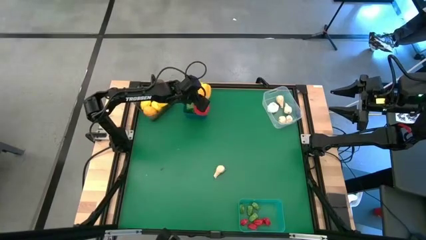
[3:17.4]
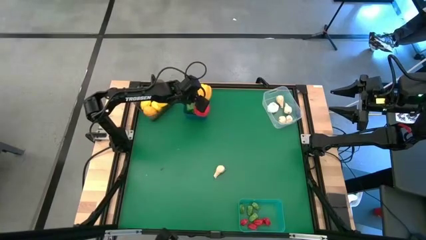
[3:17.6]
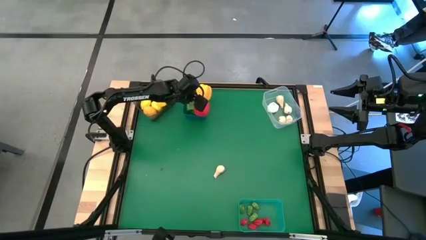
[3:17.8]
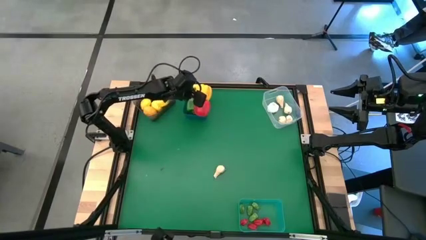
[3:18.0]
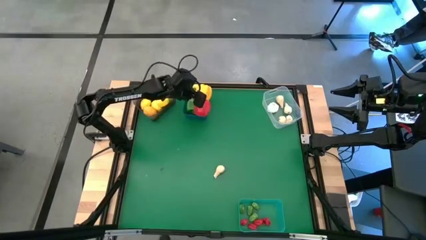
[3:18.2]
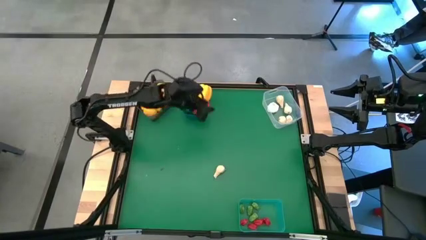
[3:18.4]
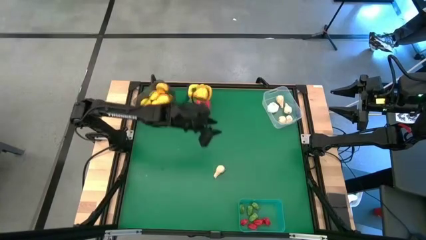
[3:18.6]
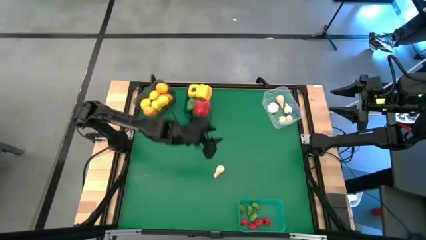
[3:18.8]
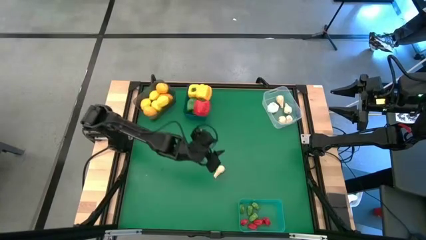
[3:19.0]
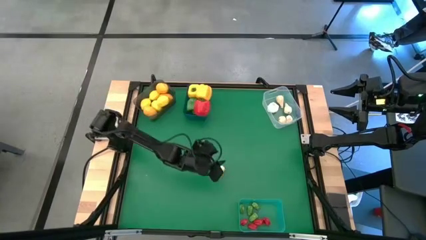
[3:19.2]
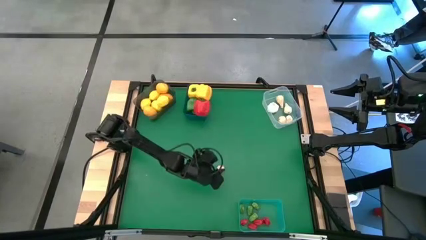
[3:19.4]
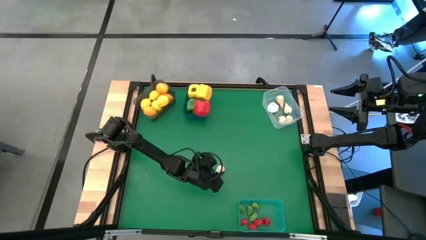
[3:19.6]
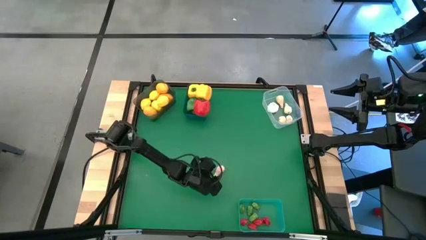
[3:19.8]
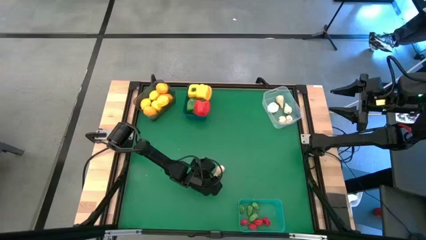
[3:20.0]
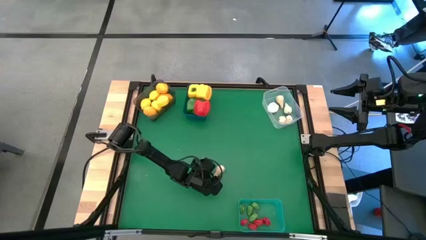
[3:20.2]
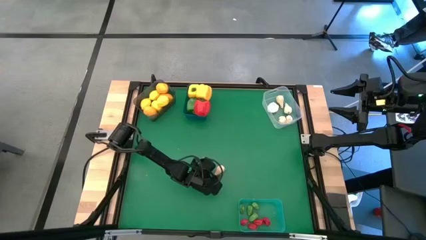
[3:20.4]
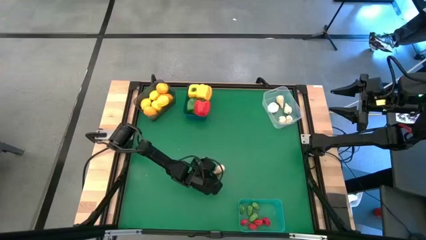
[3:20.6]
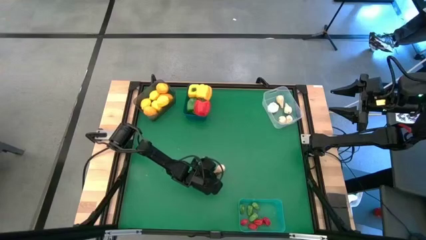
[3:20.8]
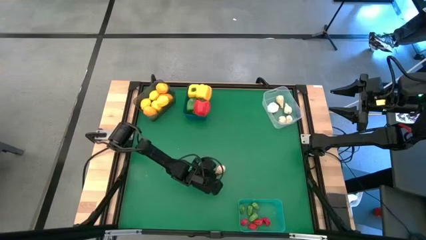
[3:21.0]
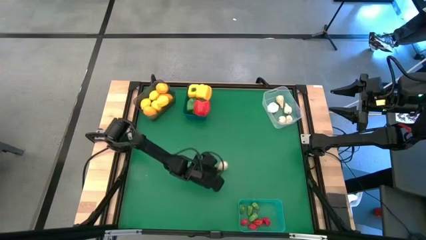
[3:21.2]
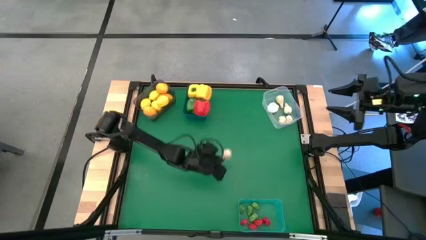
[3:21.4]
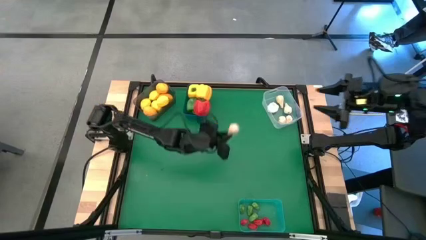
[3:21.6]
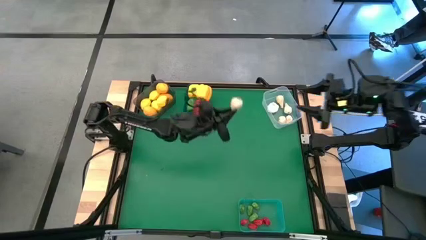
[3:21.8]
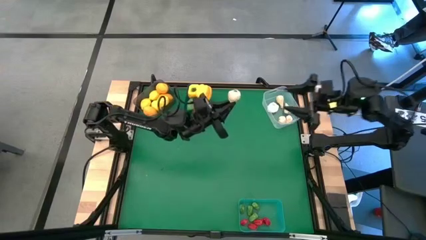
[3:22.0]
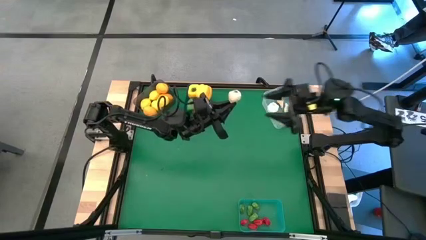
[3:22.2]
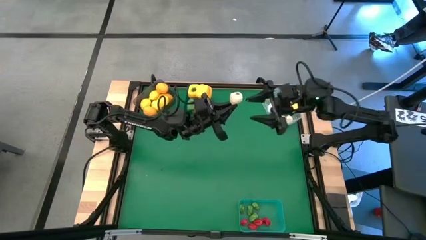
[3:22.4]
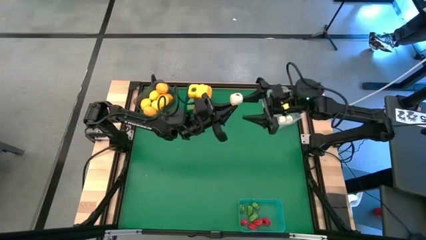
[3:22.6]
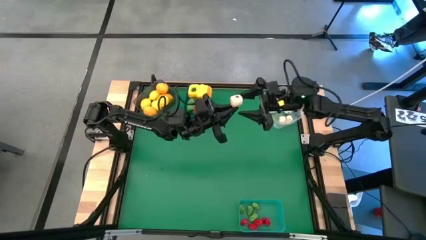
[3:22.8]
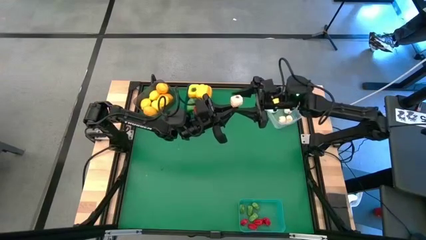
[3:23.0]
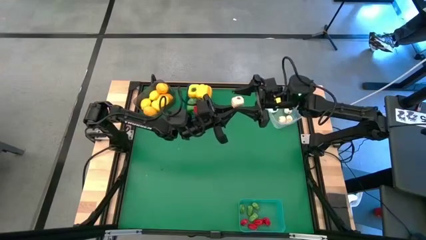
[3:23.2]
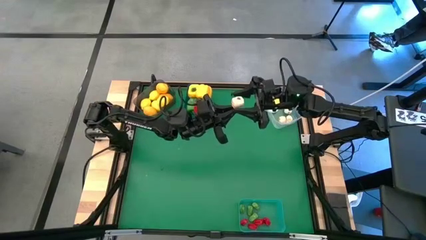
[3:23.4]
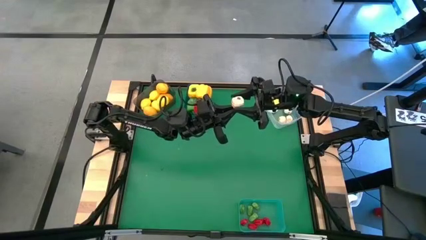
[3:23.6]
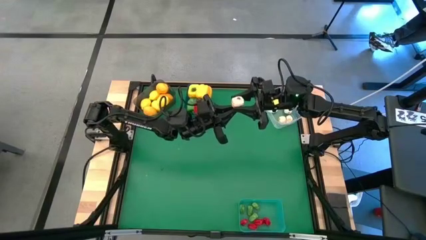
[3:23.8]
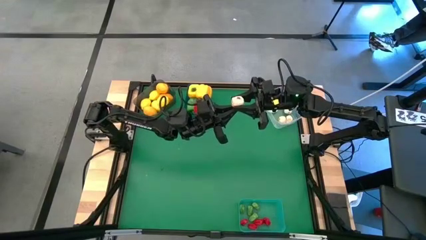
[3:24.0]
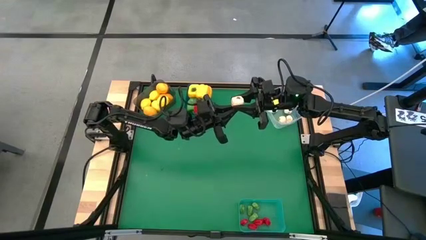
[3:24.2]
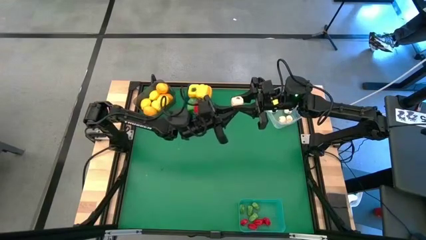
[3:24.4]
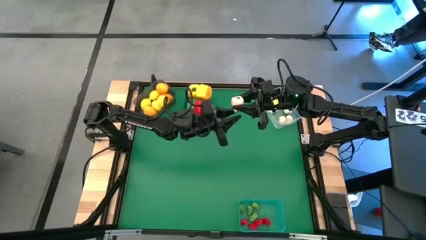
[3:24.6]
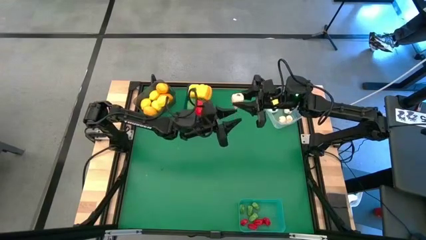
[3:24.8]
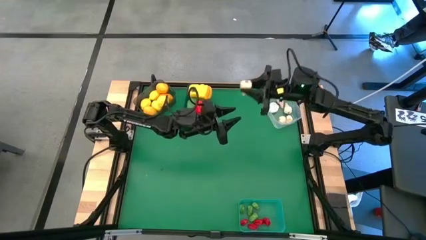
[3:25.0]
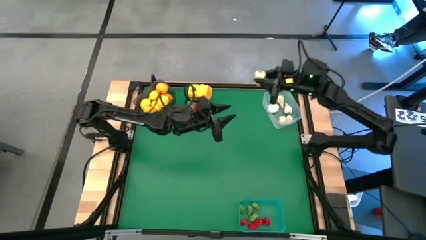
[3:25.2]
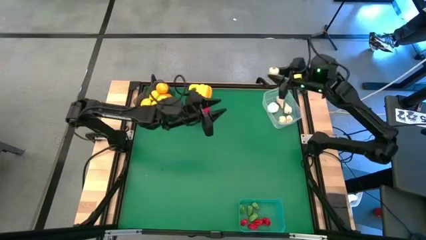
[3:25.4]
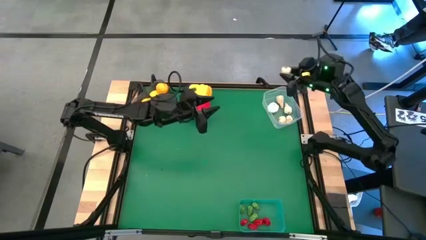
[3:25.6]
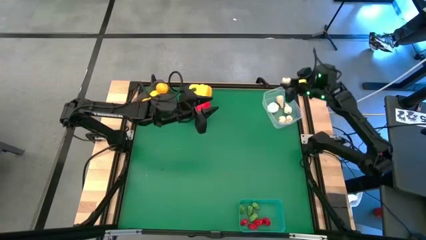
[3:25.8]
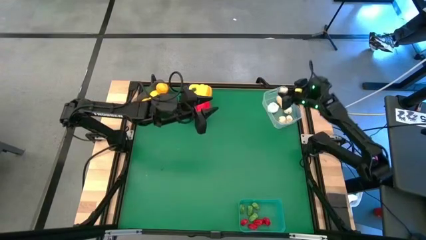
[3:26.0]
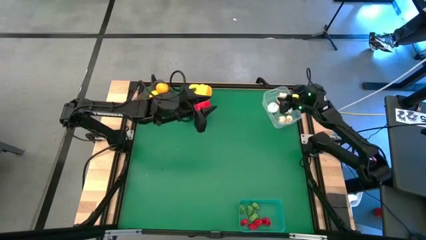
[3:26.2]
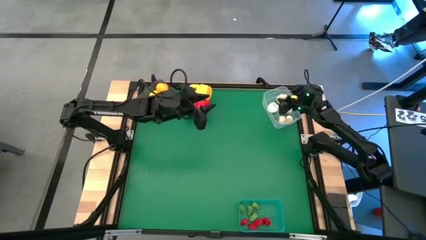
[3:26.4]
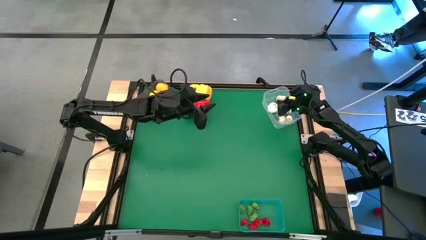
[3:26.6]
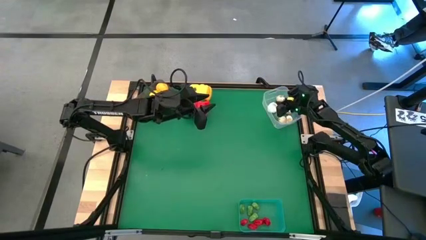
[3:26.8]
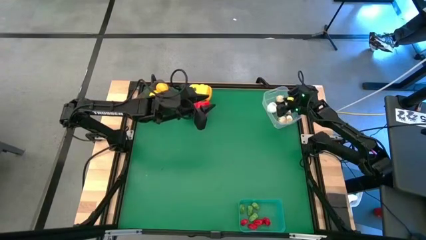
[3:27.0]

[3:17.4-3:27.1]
Task: Sort produce into baskets
Put the white garlic into the transparent bin

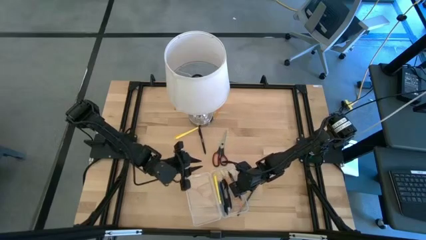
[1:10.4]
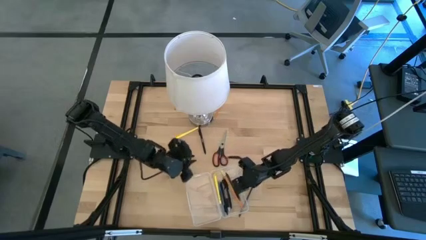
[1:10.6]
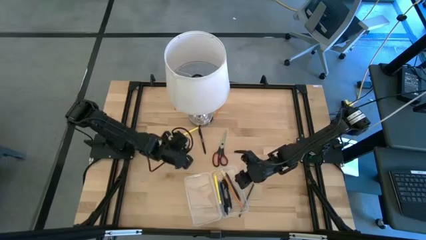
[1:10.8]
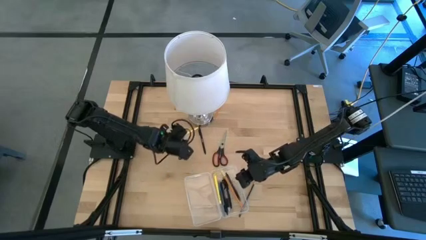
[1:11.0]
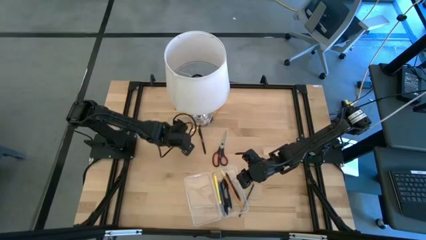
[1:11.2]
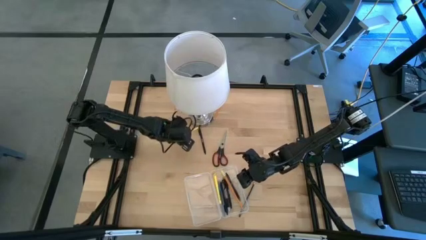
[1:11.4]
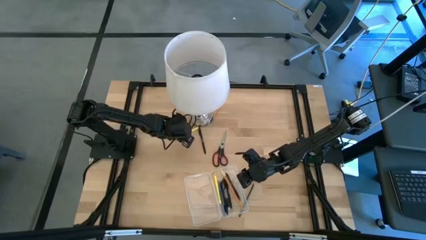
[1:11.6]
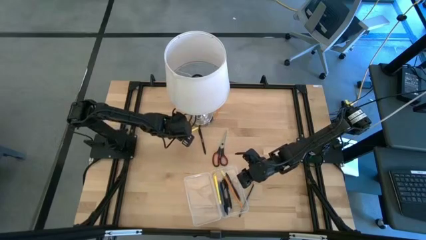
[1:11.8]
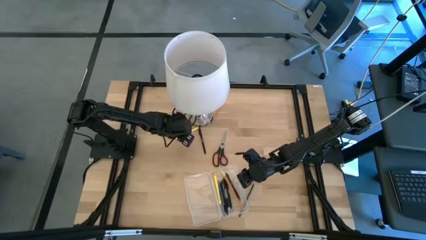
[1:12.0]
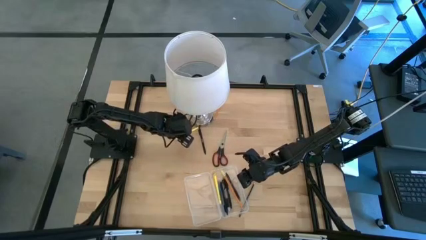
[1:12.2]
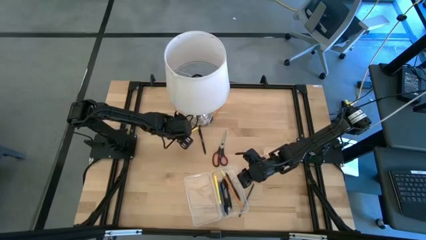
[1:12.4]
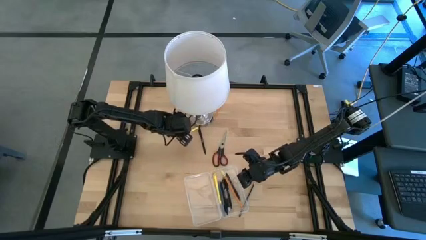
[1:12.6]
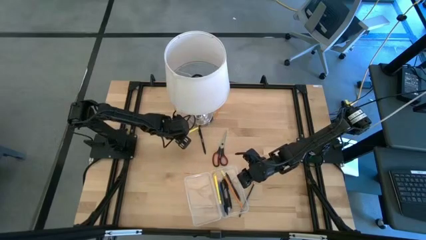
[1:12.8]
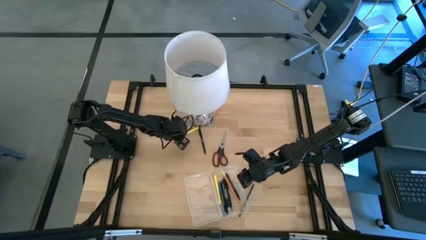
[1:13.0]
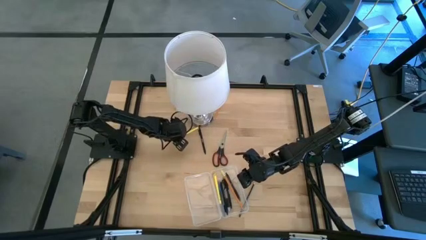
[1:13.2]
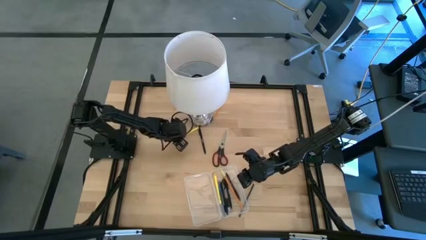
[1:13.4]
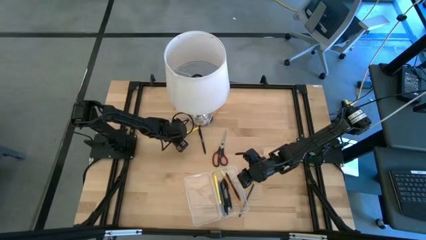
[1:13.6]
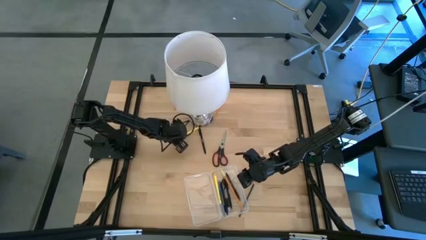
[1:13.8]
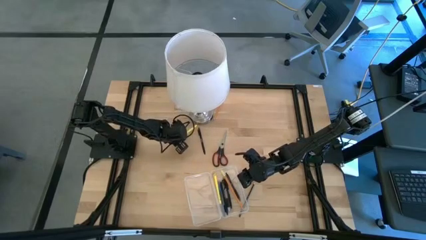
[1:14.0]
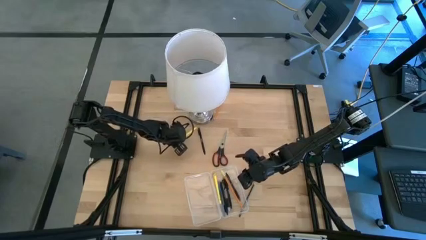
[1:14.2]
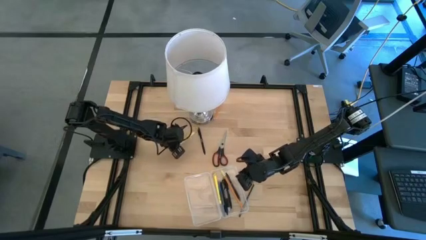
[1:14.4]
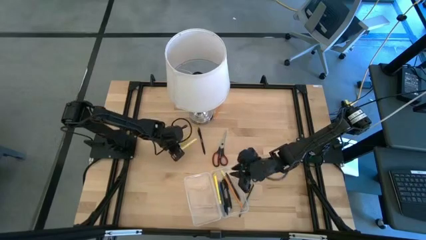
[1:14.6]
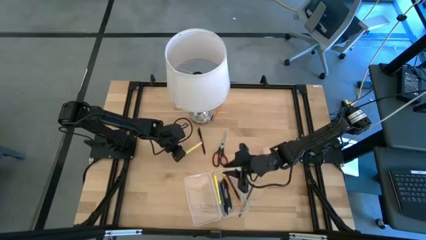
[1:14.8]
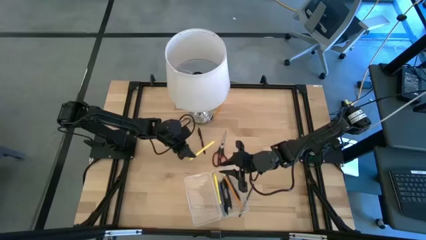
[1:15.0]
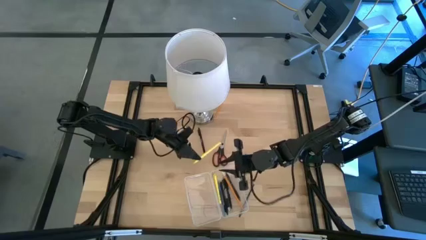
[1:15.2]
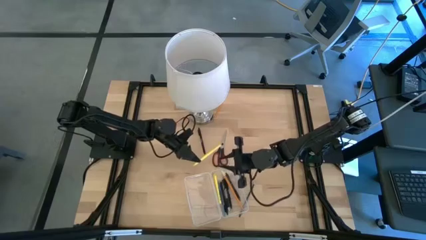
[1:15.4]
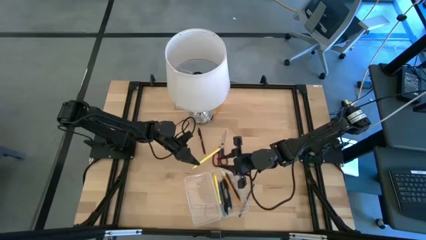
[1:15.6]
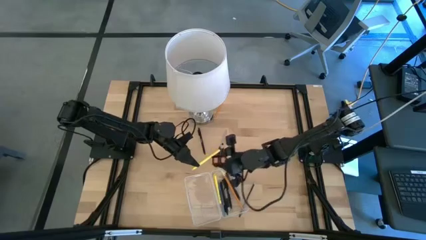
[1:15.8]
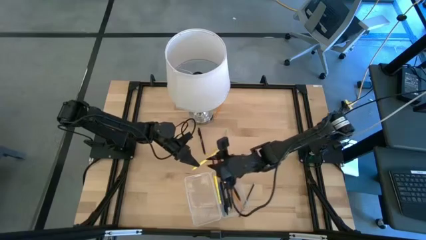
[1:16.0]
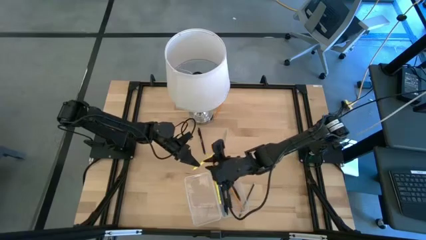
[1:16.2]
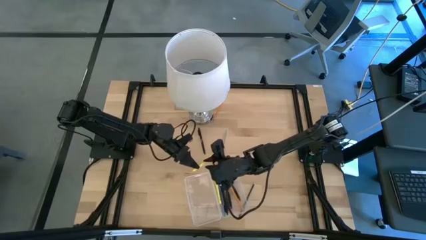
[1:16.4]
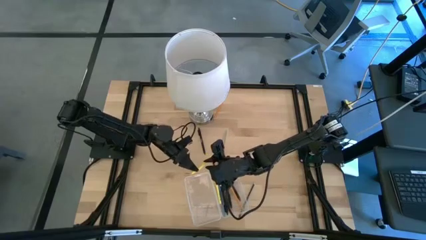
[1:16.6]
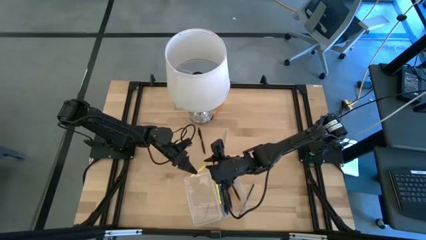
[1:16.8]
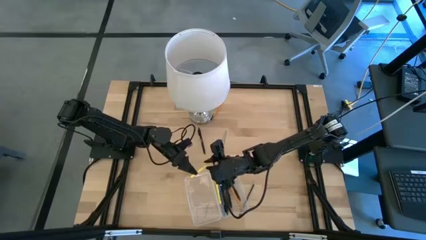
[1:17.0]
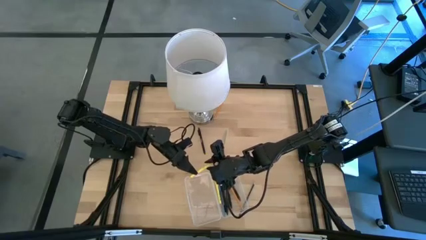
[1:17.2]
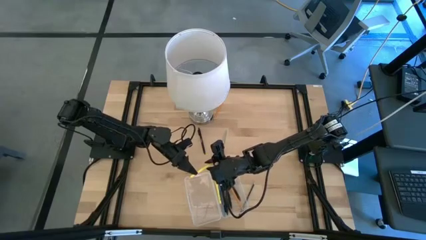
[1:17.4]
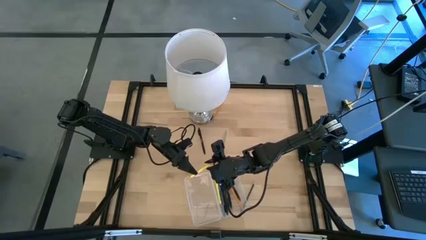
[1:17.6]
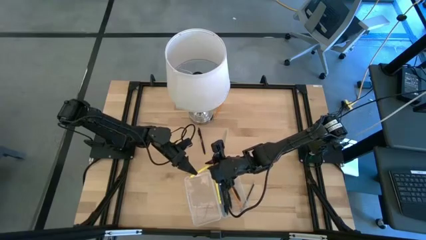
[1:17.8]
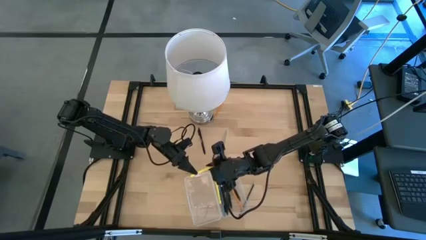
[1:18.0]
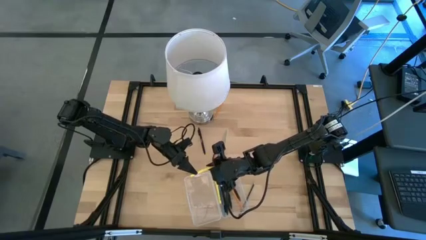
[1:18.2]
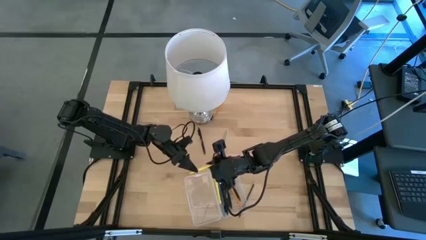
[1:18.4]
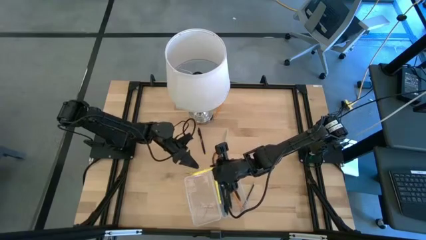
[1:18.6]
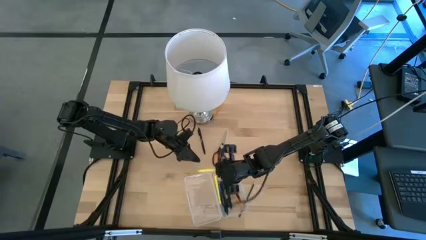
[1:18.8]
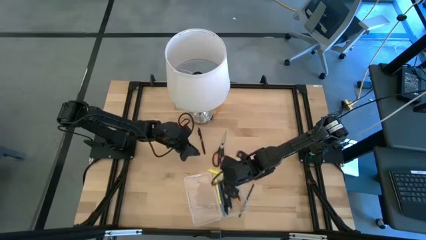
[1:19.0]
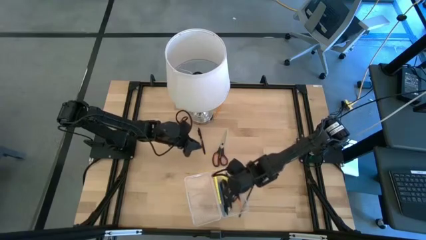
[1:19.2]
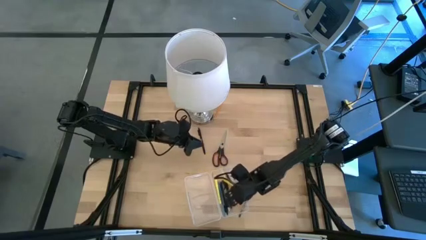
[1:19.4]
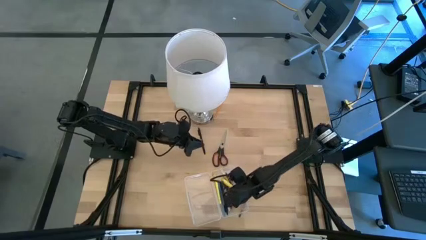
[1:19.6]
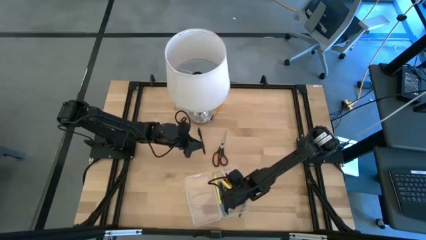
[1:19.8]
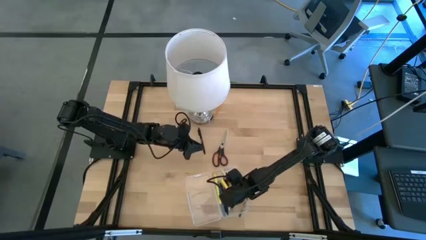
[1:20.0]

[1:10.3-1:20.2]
Task: Pick & place school supplies into a supply box
Put the yellow marker pen into the transparent supply box
